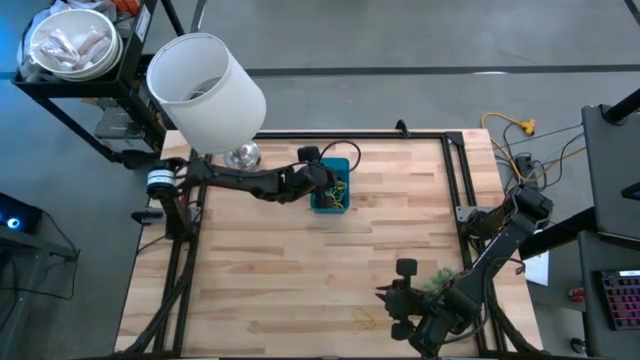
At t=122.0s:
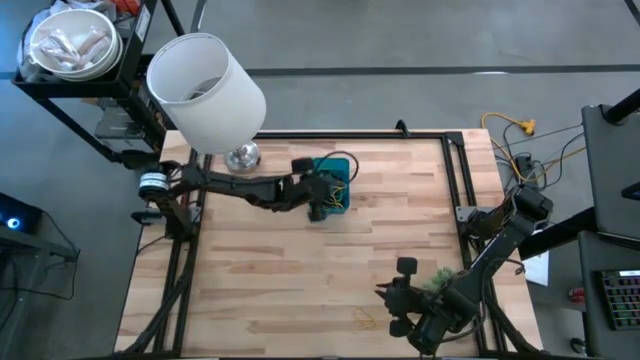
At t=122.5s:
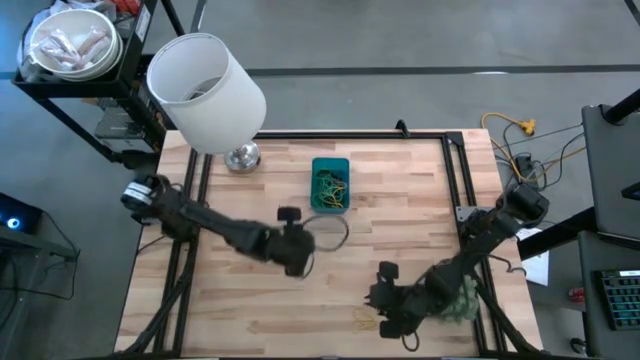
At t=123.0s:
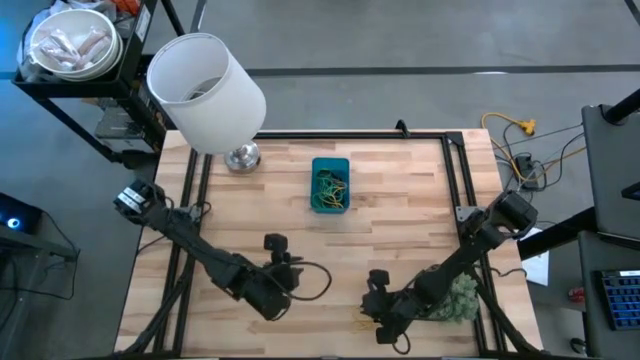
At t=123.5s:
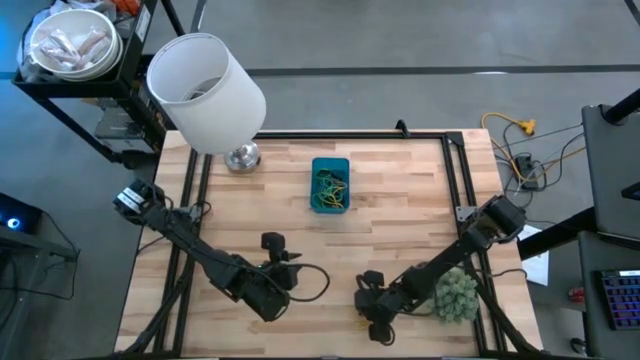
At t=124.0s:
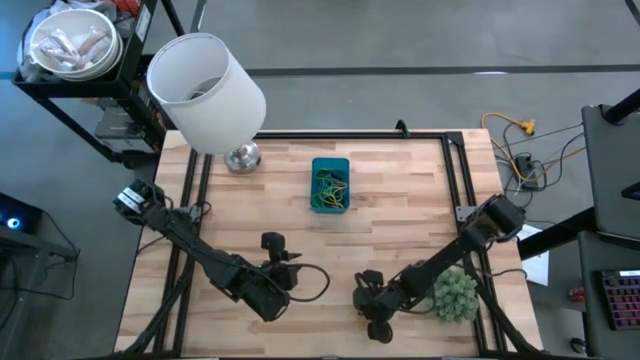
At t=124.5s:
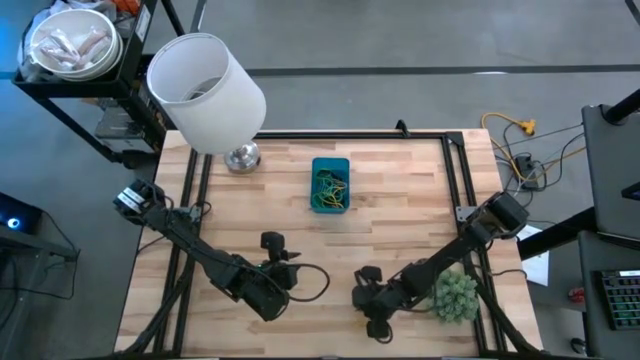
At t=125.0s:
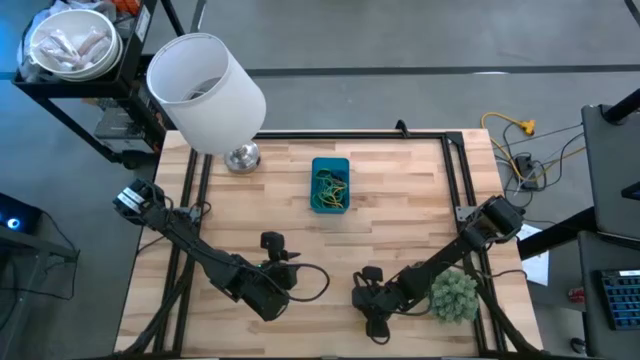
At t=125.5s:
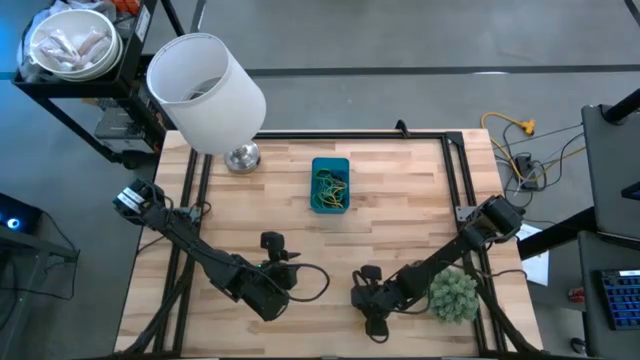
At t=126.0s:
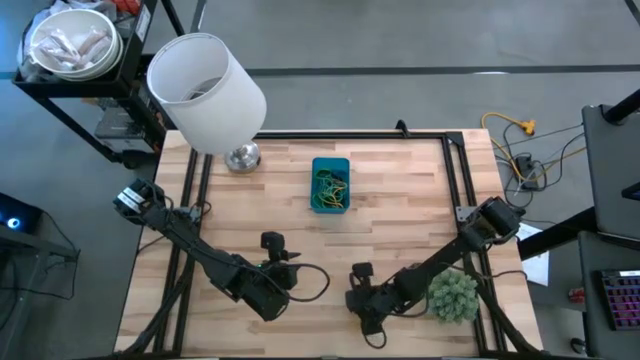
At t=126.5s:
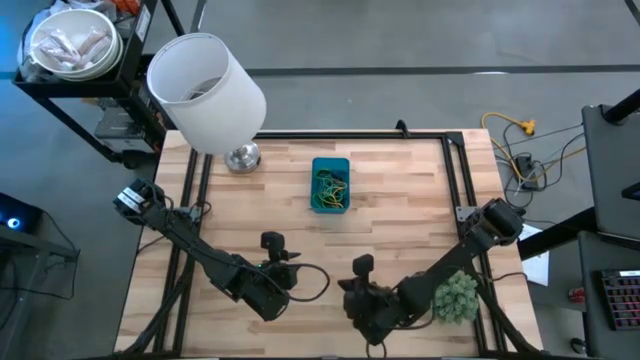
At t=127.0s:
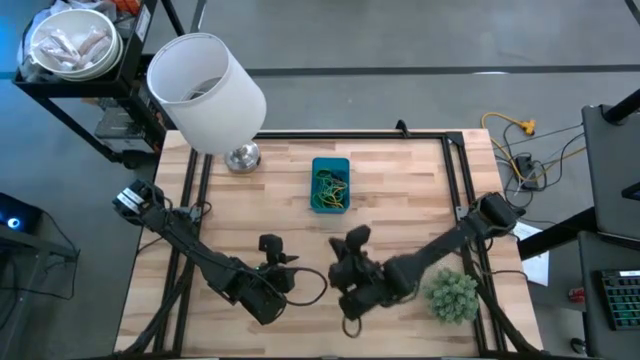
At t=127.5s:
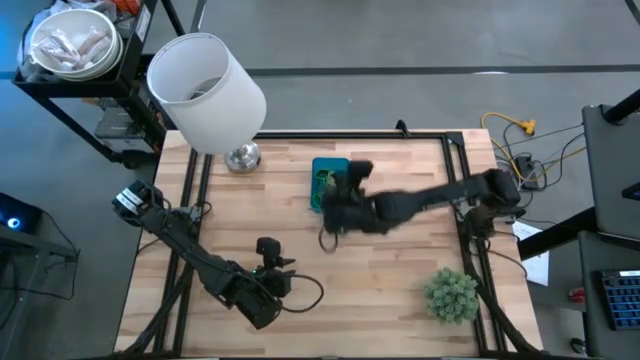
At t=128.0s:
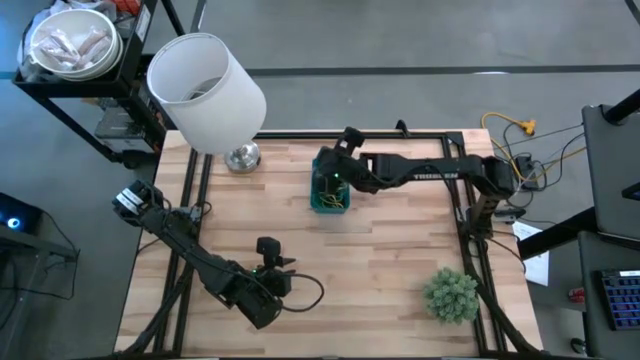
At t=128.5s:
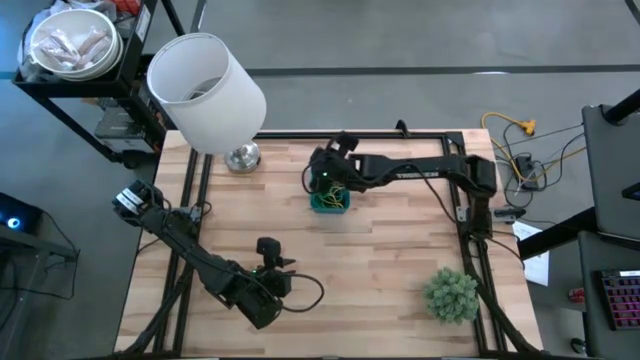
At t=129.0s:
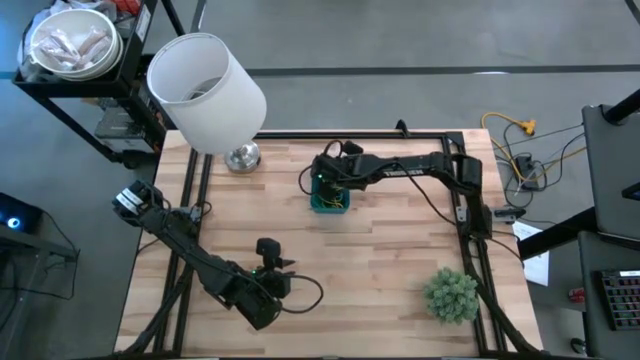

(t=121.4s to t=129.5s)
Task: Pick and place rubber bands into bin
Put the yellow rubber band into the blue bin

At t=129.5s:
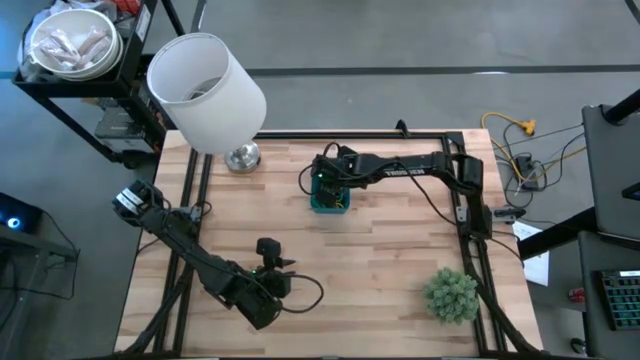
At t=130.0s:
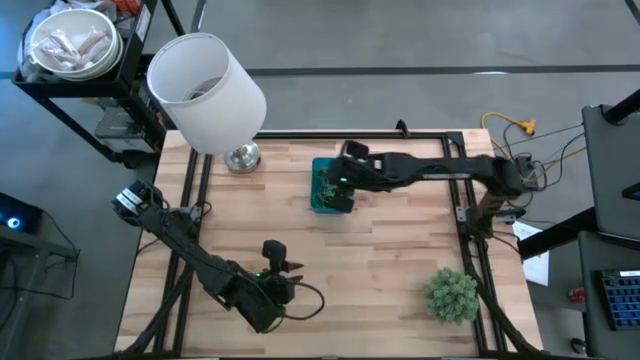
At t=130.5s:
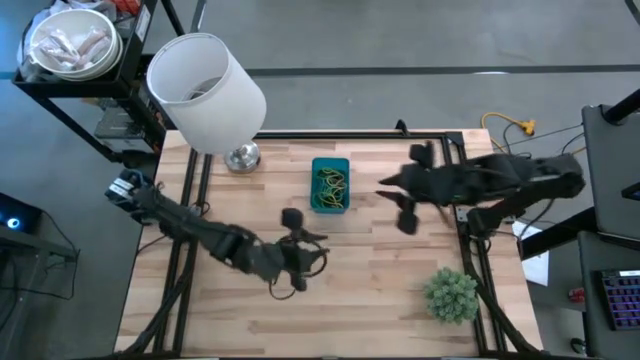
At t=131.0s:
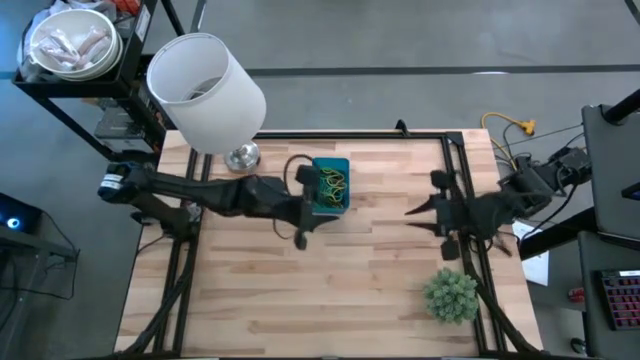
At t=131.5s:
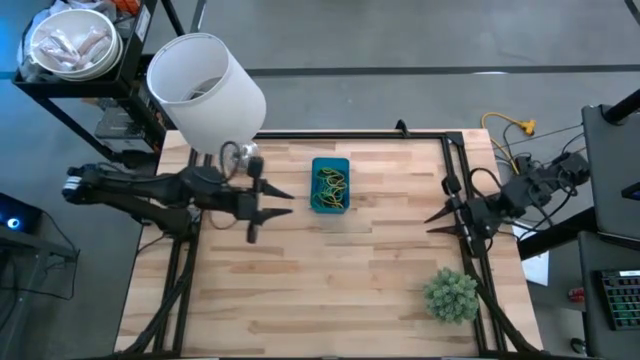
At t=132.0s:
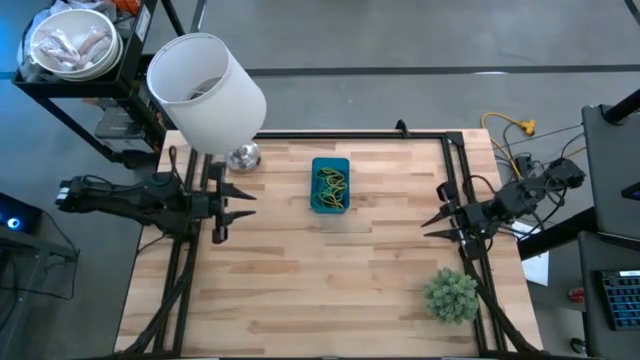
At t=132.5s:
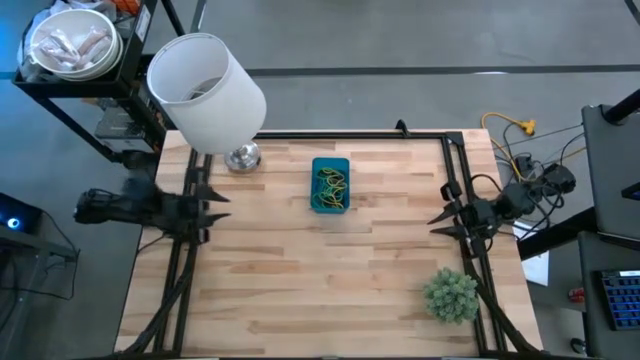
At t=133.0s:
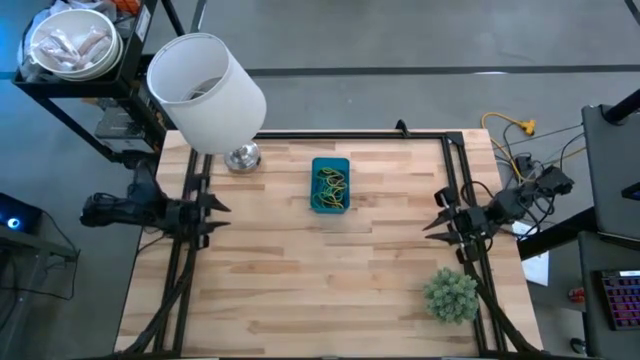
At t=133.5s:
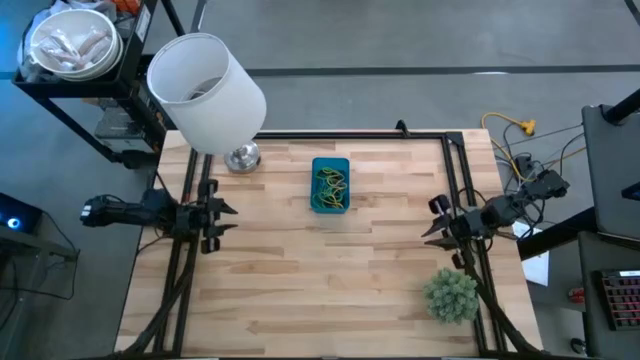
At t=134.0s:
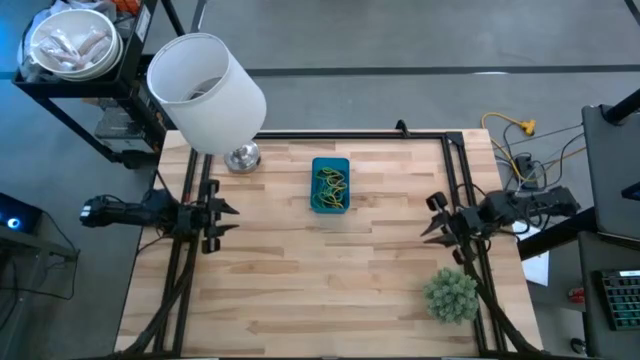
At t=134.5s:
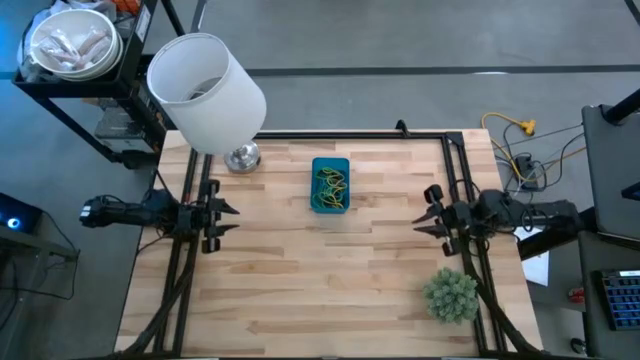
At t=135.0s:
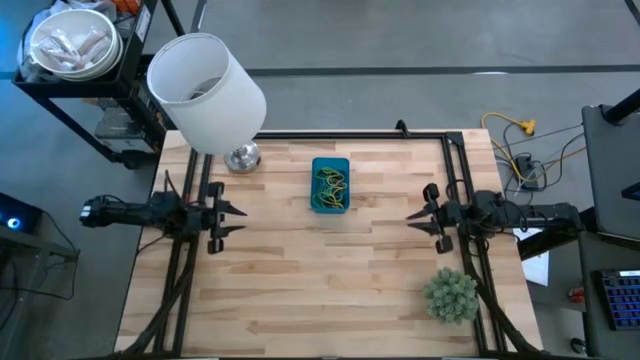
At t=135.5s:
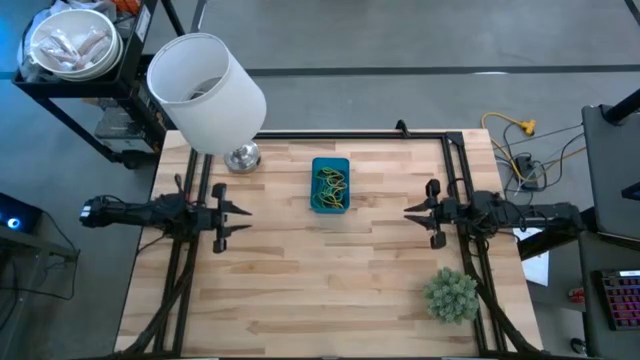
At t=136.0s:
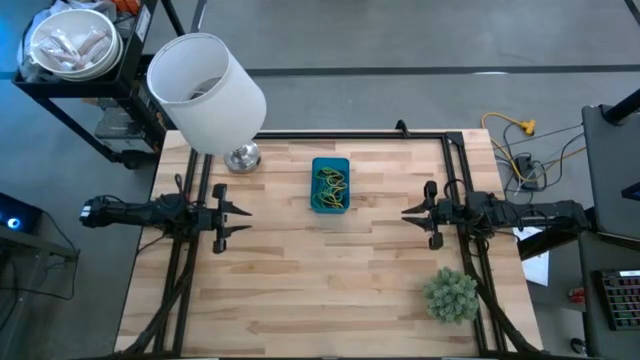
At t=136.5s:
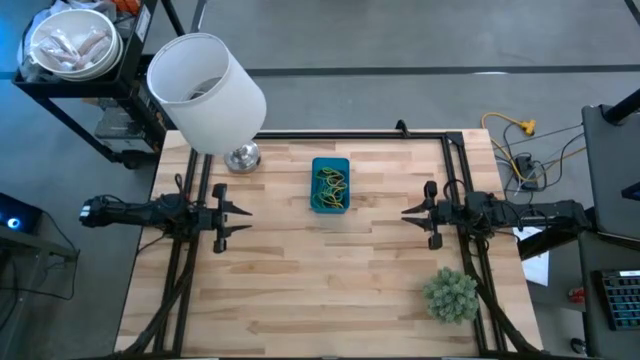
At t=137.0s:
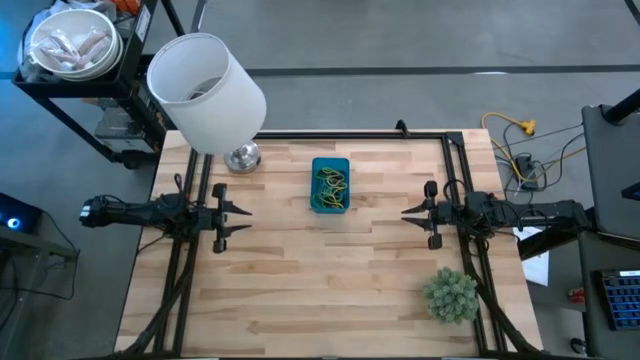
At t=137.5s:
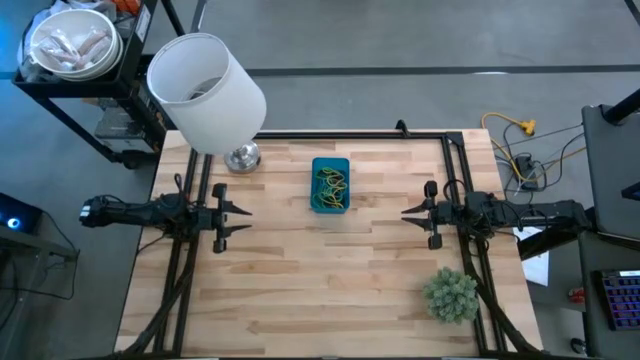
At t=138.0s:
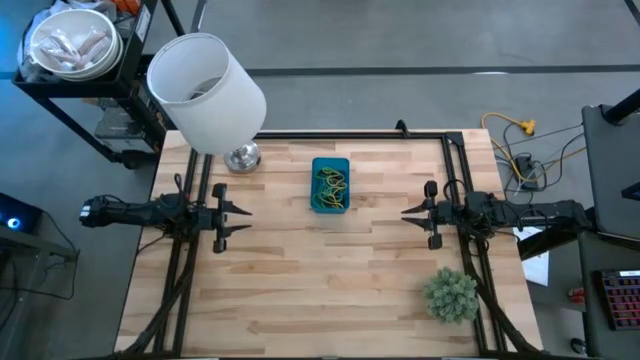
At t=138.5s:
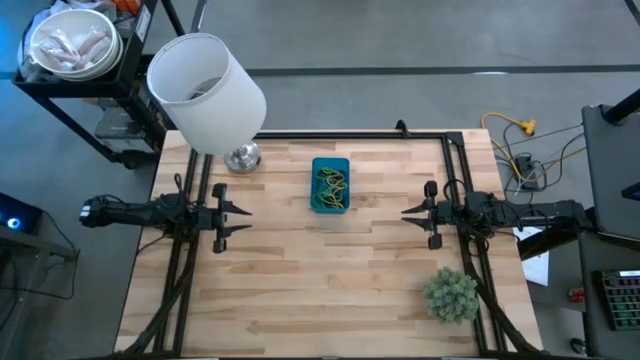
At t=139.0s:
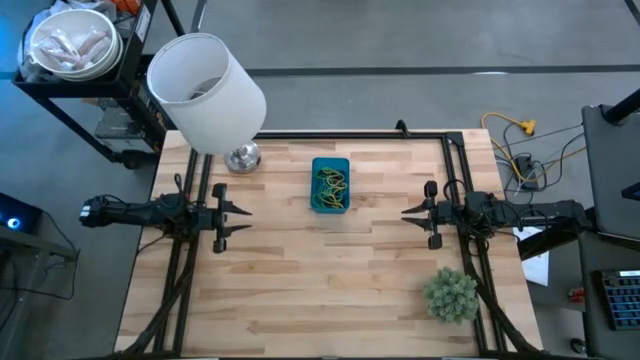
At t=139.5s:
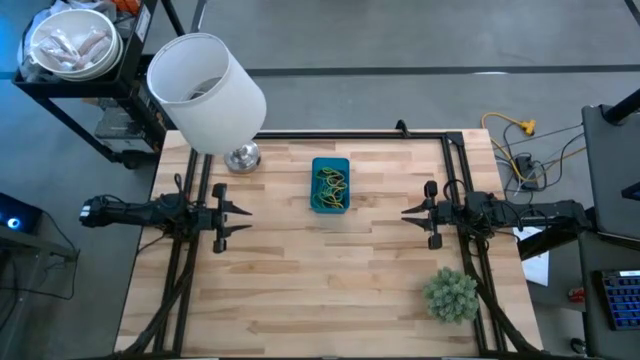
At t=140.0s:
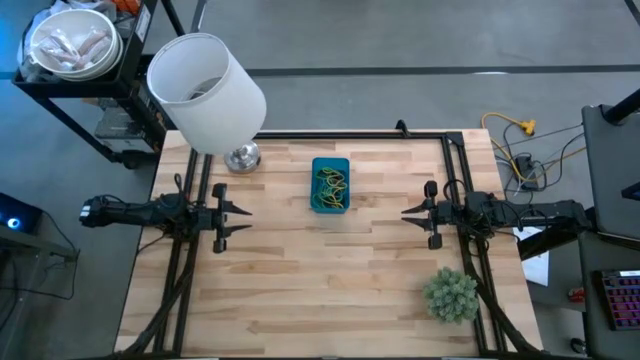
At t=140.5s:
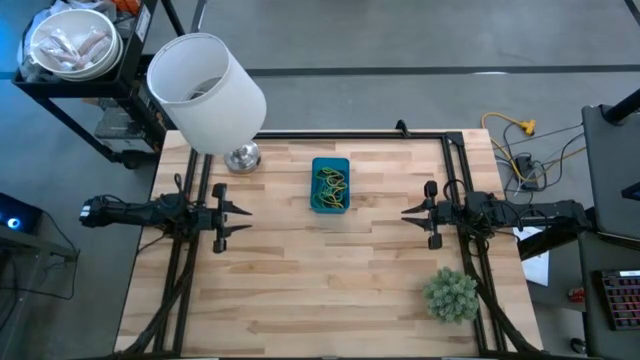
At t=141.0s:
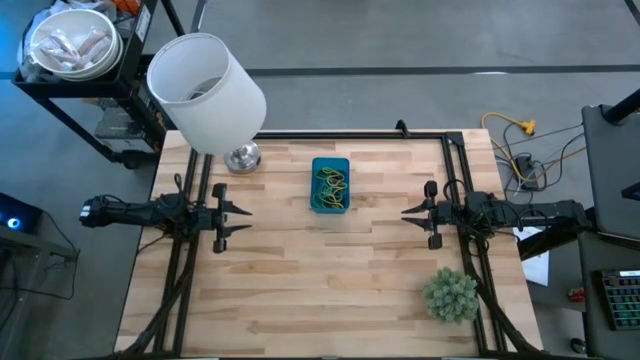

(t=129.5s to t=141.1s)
Return to Home Position

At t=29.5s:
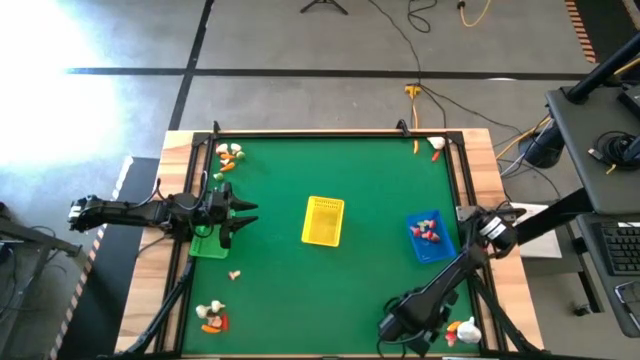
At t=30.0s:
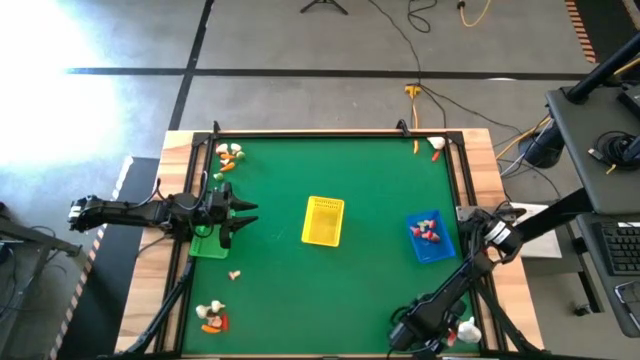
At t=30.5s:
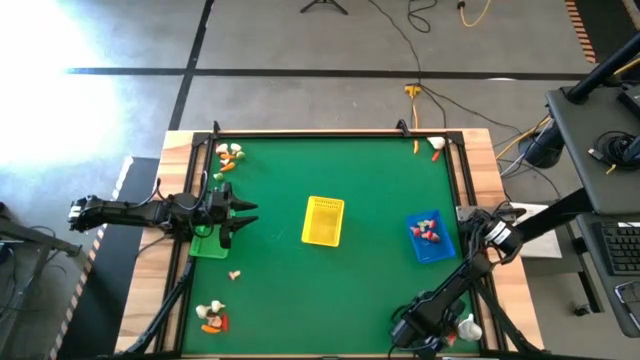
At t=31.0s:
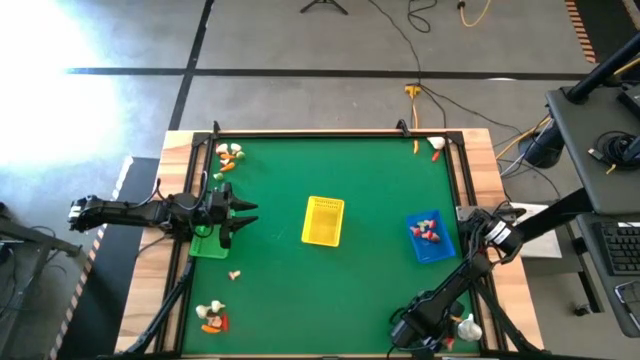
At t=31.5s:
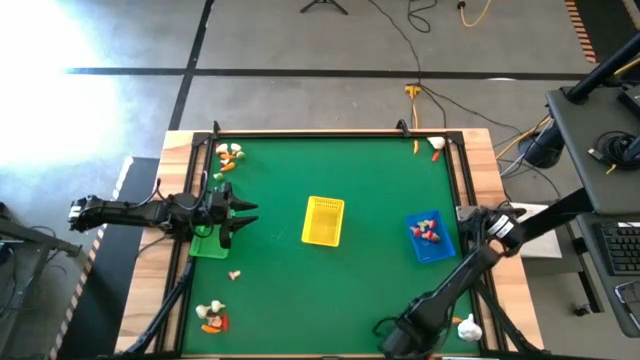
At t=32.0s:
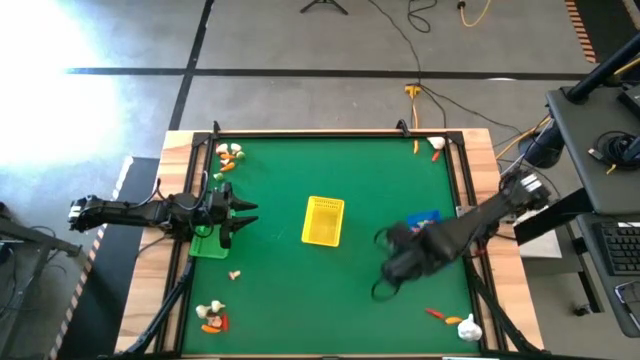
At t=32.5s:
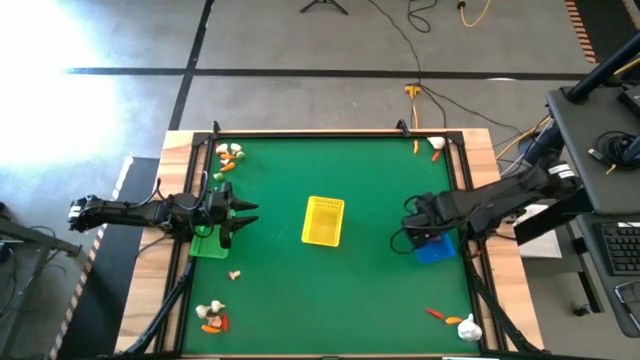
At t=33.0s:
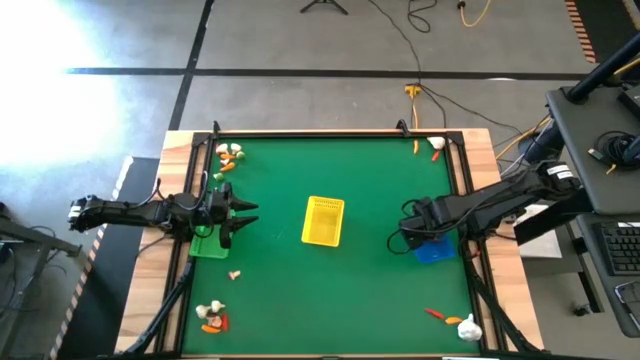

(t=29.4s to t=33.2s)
Task: Sort produce into baskets
Put the red mushroom into the blue bin
